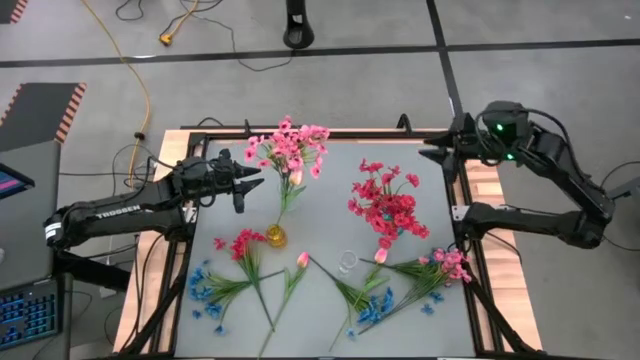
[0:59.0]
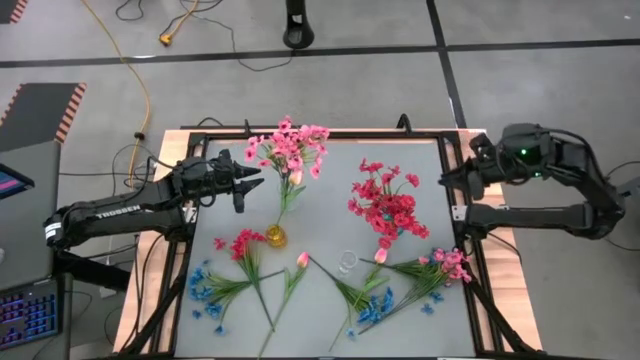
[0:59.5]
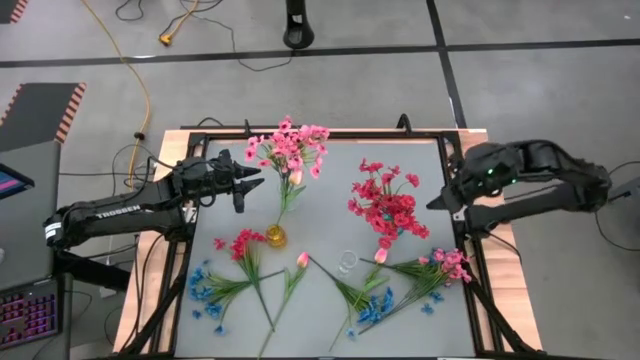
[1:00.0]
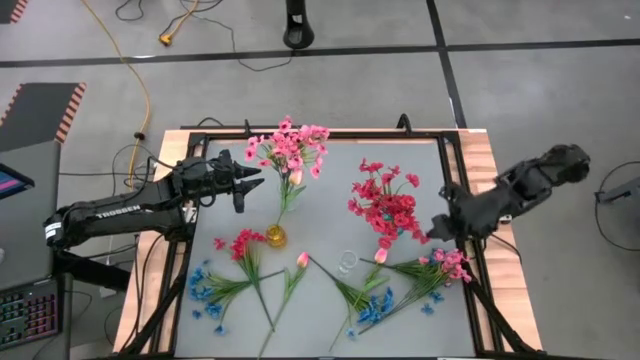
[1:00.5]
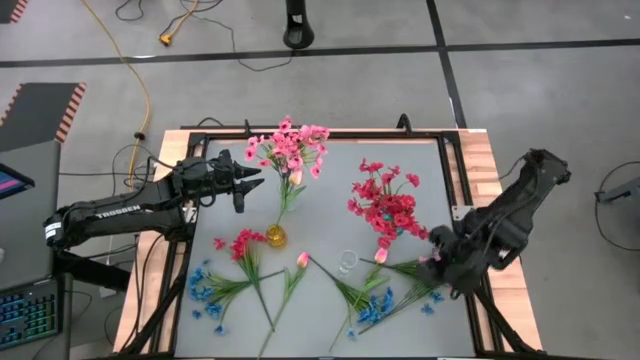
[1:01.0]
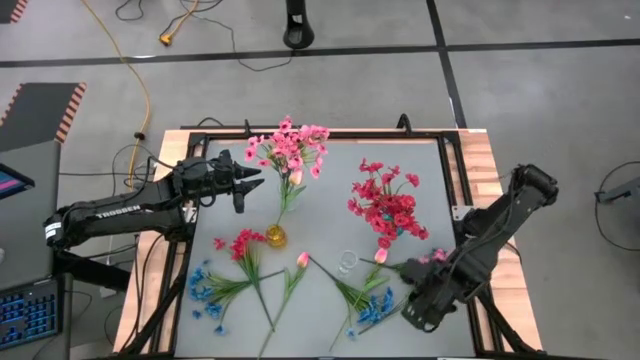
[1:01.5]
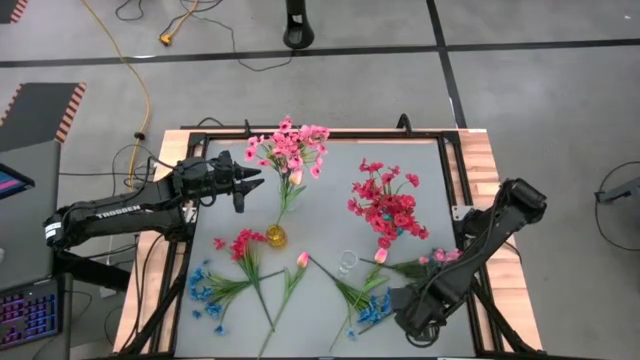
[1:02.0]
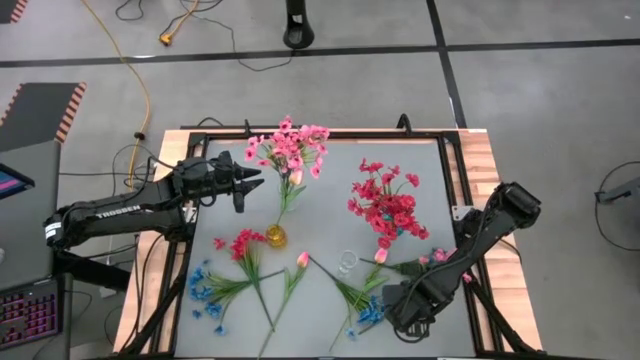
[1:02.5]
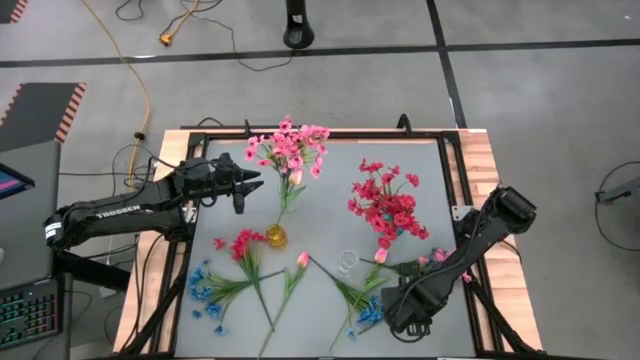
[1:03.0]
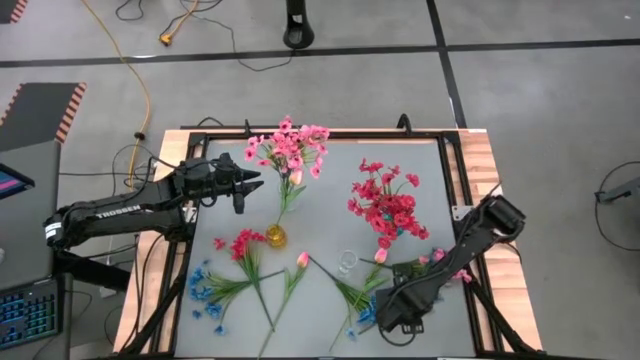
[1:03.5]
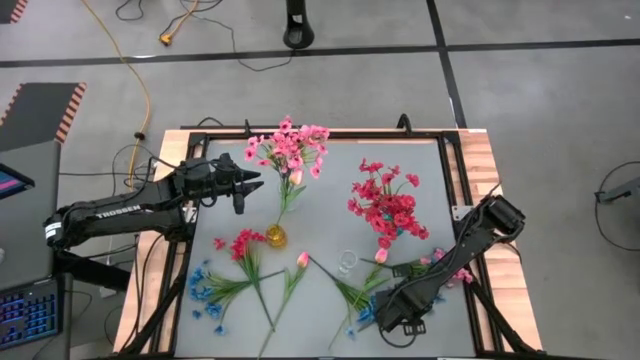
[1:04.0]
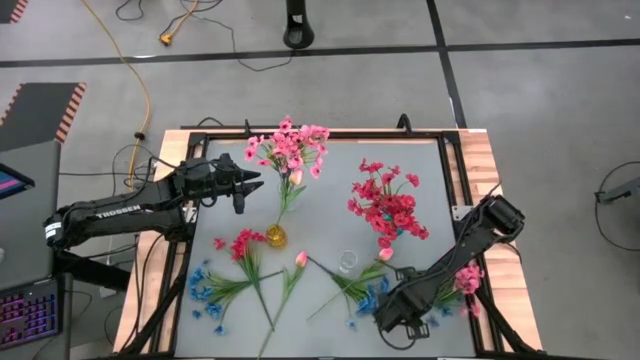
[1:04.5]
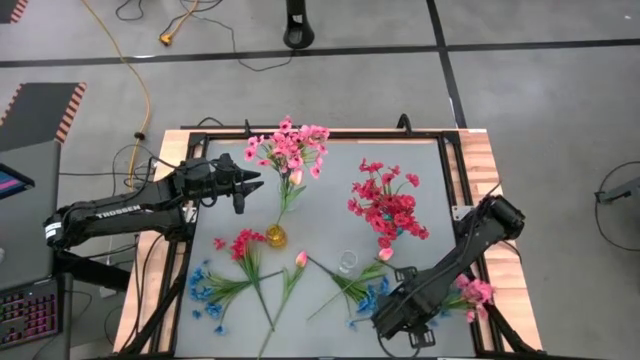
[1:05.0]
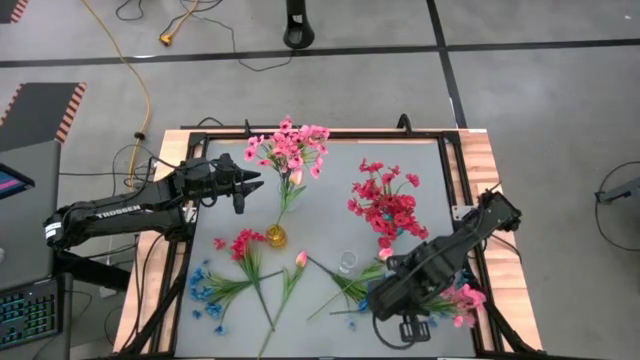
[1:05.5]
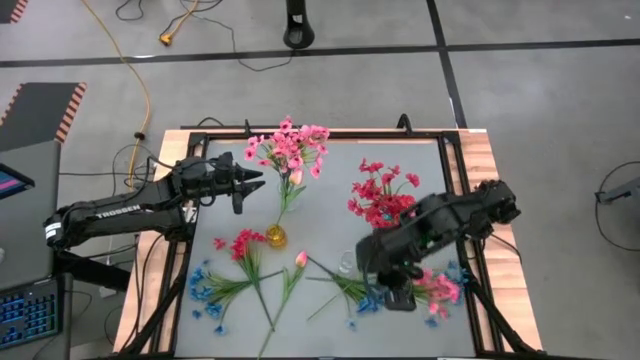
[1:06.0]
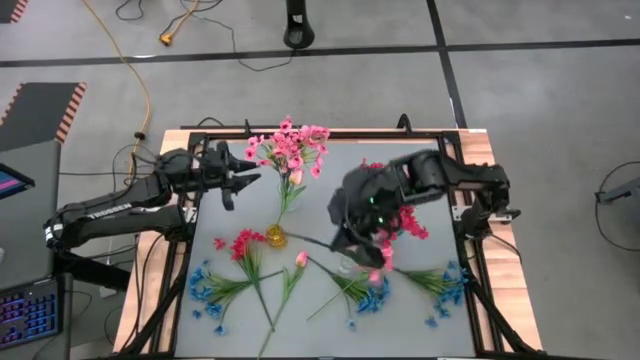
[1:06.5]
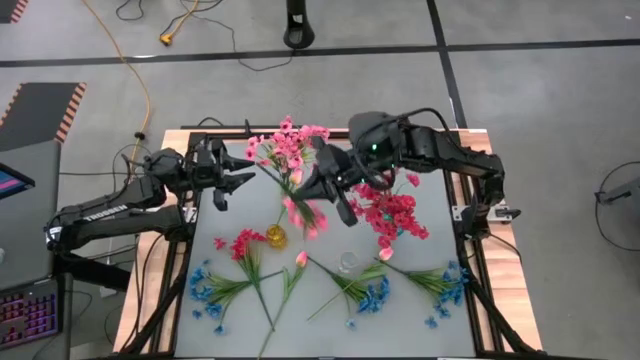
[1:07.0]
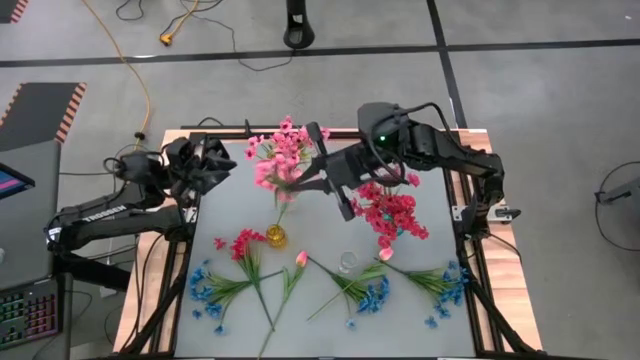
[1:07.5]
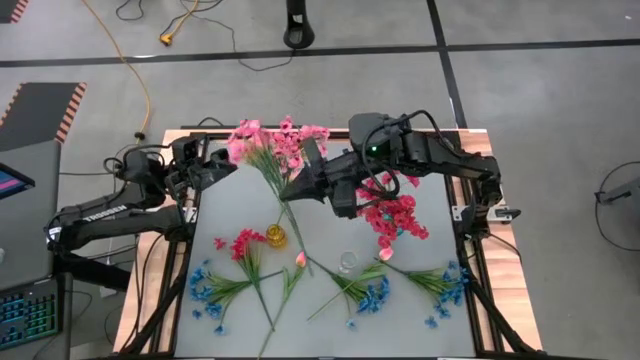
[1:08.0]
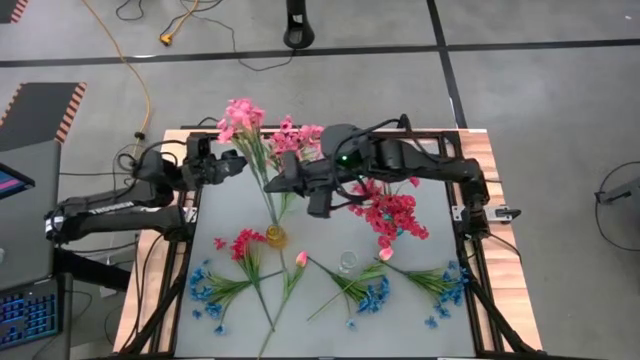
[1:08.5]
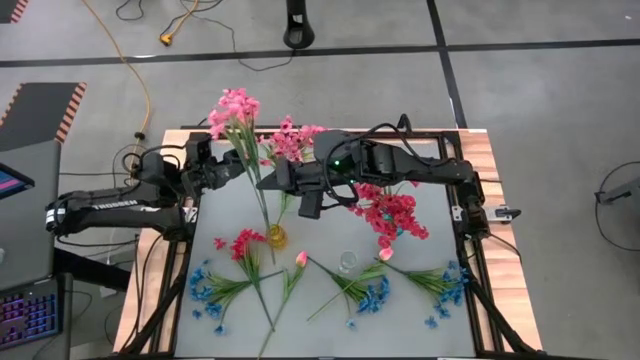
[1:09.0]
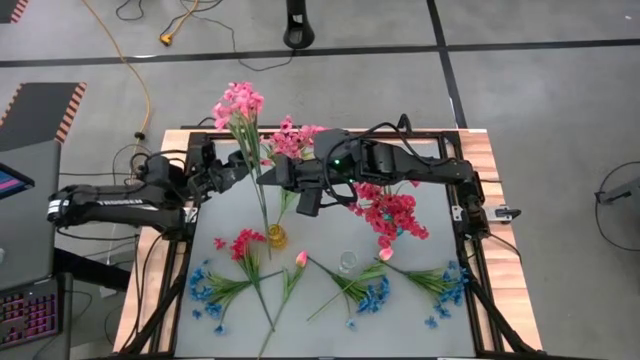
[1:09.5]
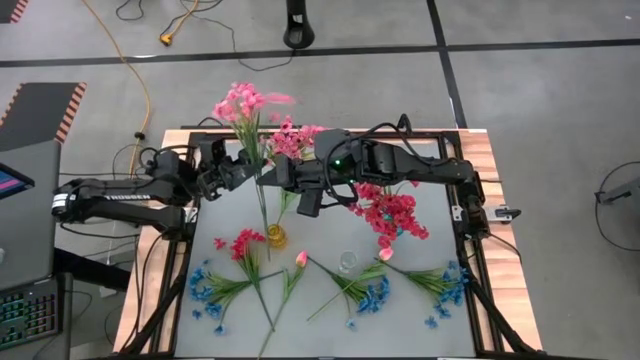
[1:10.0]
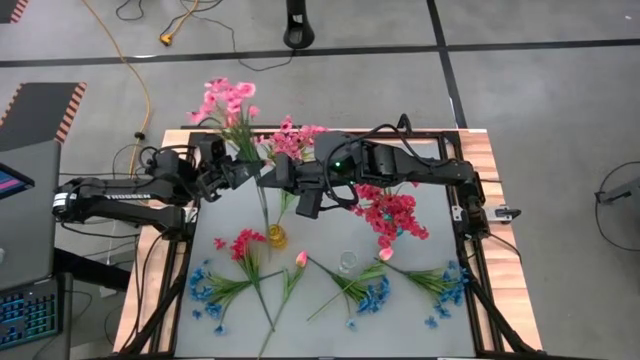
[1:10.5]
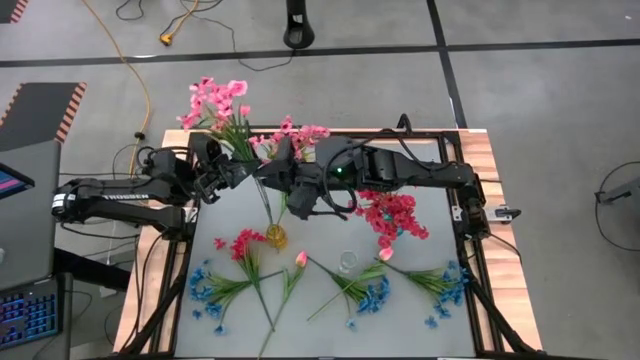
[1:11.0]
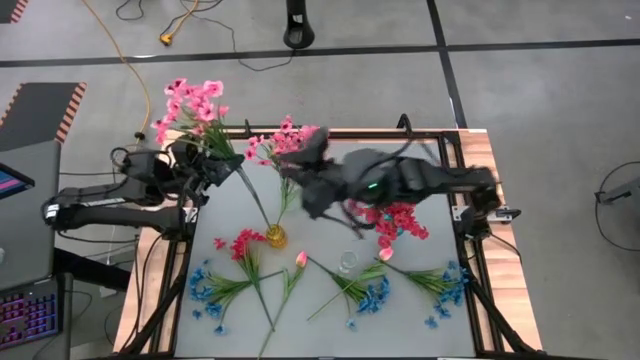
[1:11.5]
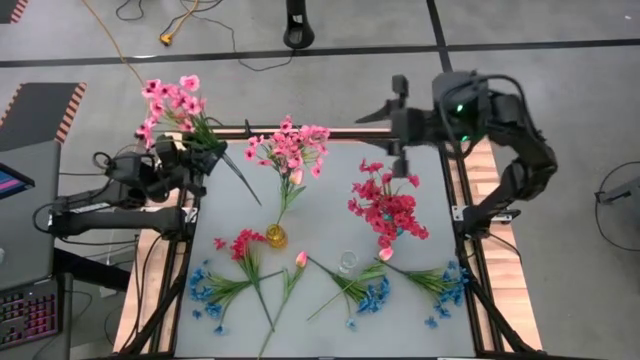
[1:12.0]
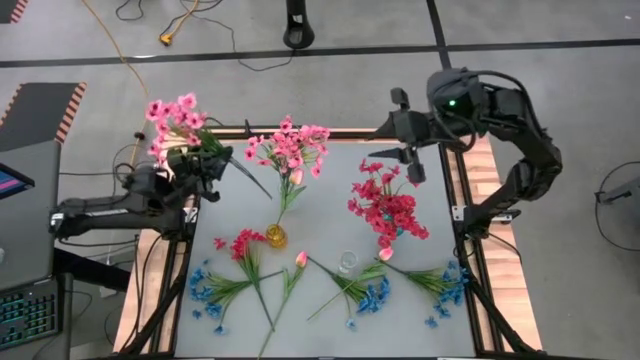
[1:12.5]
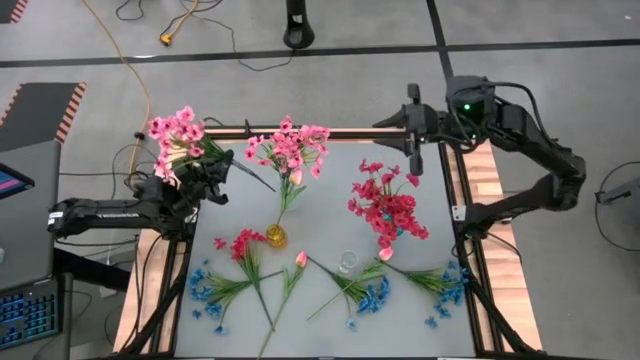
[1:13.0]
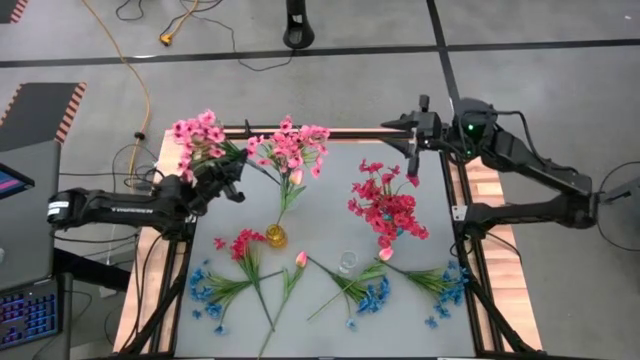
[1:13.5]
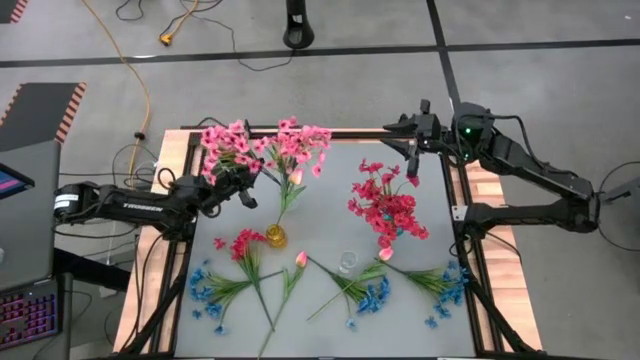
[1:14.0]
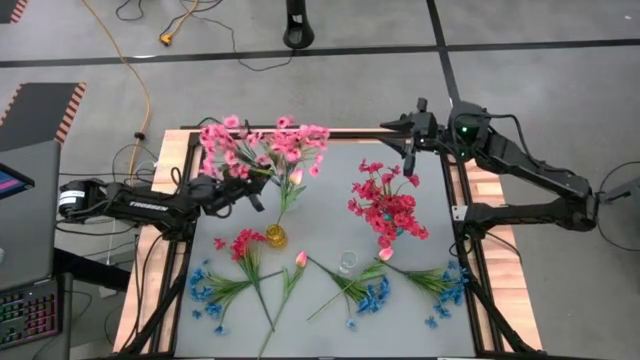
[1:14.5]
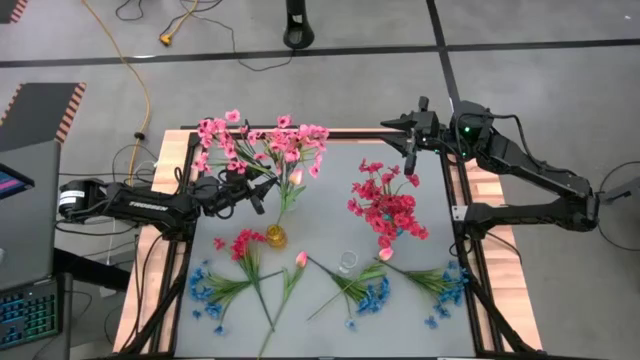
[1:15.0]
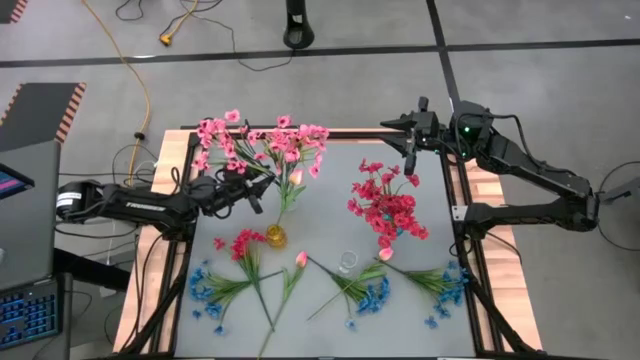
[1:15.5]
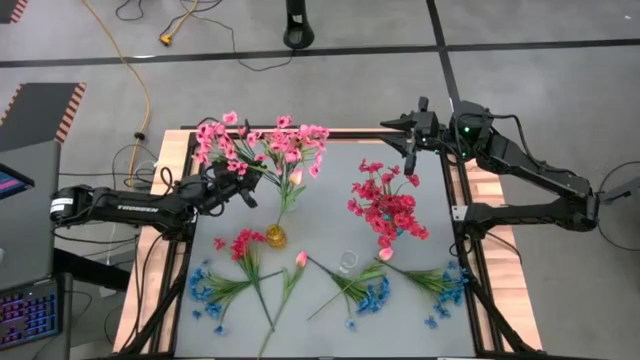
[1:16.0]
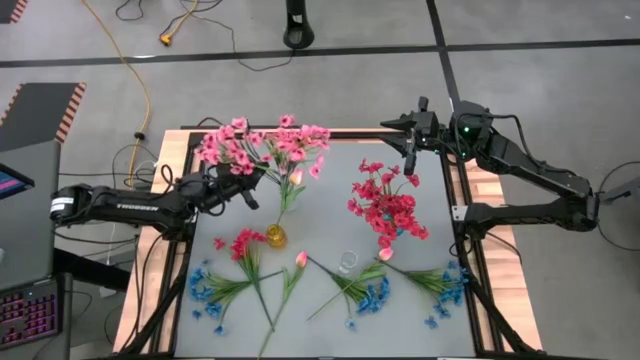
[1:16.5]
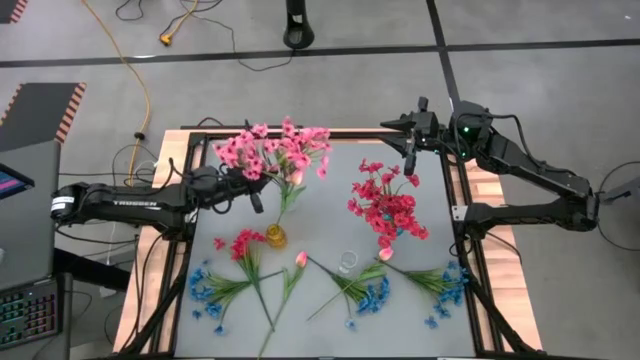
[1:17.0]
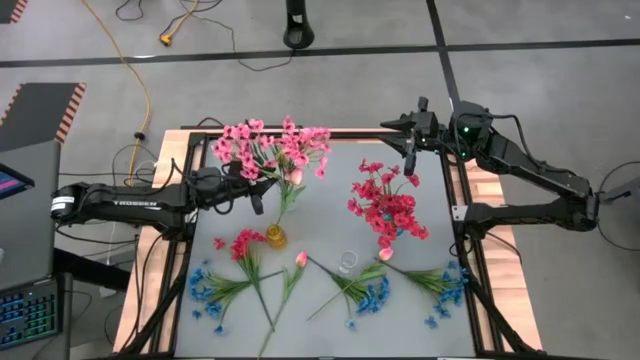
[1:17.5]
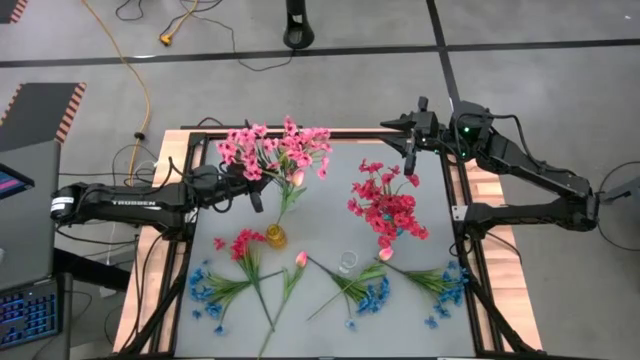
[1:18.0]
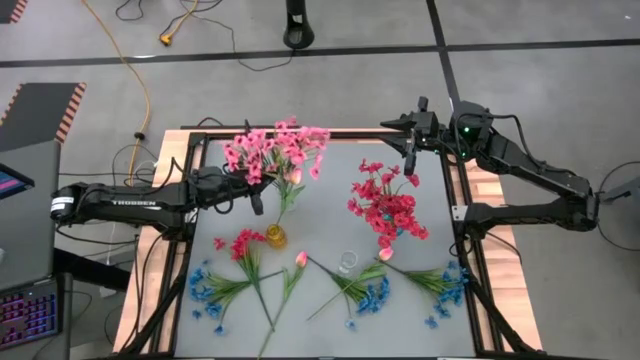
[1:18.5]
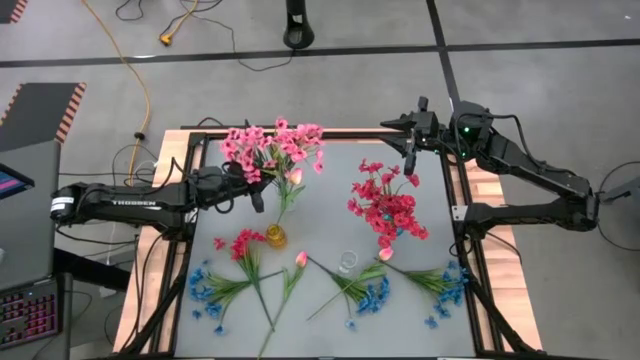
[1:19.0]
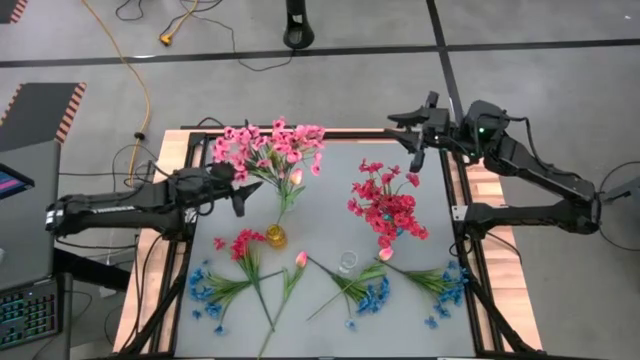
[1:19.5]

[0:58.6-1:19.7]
Task: Sort flowers into vase by color
Put the pink flowers into the top transparent vase

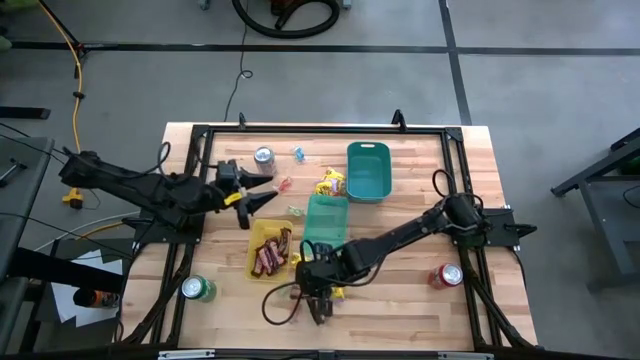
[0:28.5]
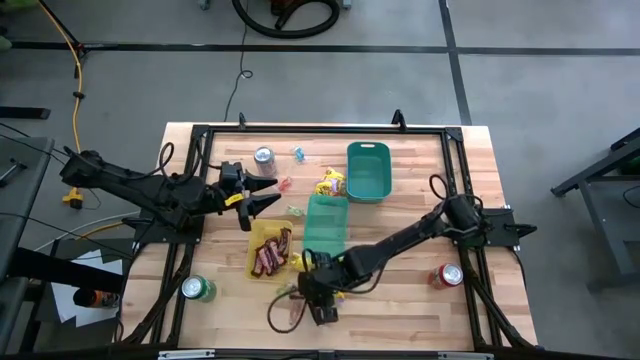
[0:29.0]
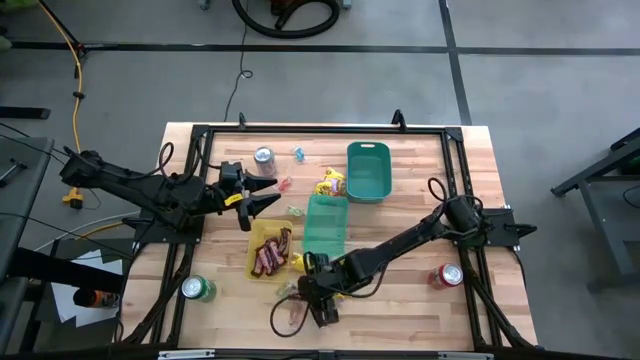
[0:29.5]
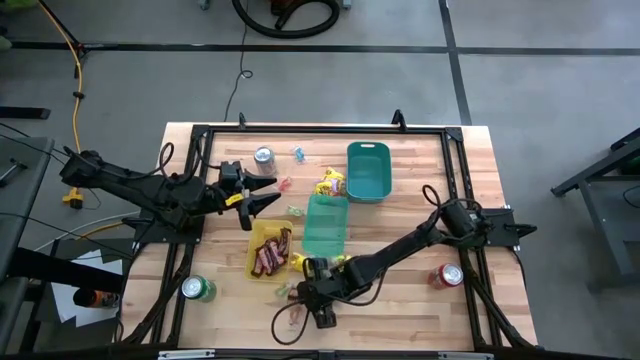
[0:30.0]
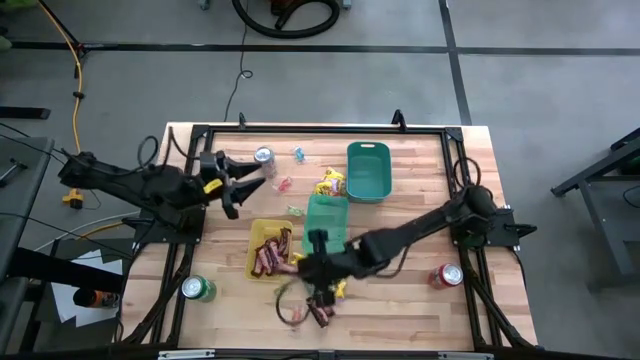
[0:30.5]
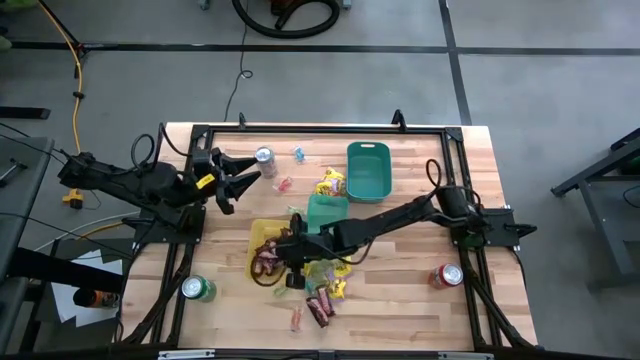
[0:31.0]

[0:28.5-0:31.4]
Task: Sort candy
Put the brown chocolate bar into the yellow bin
